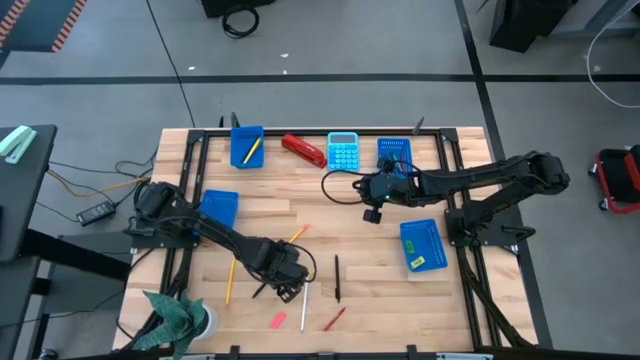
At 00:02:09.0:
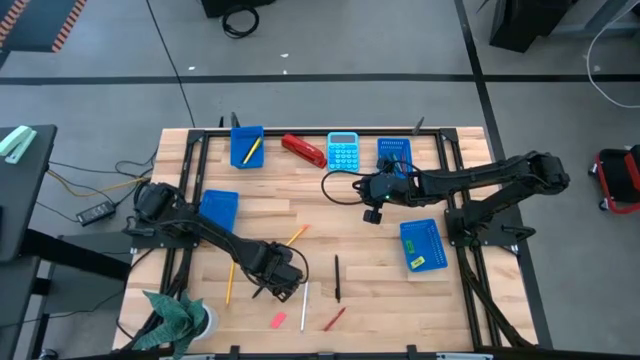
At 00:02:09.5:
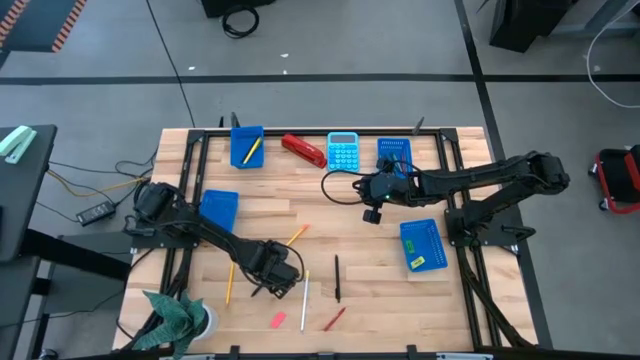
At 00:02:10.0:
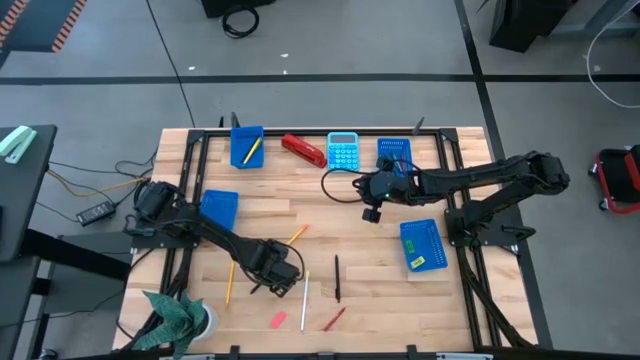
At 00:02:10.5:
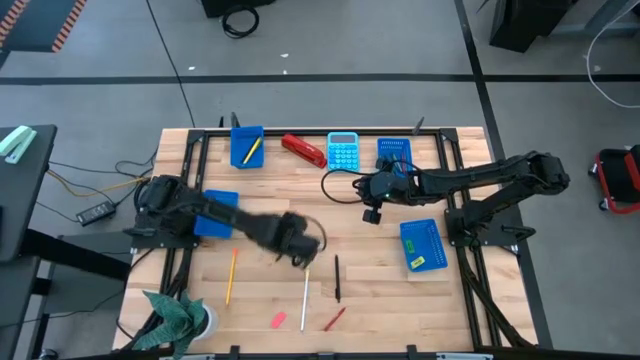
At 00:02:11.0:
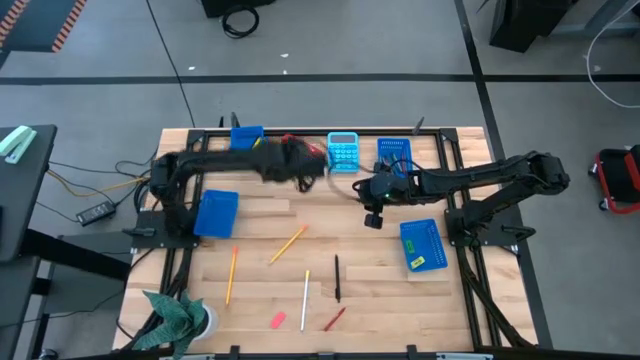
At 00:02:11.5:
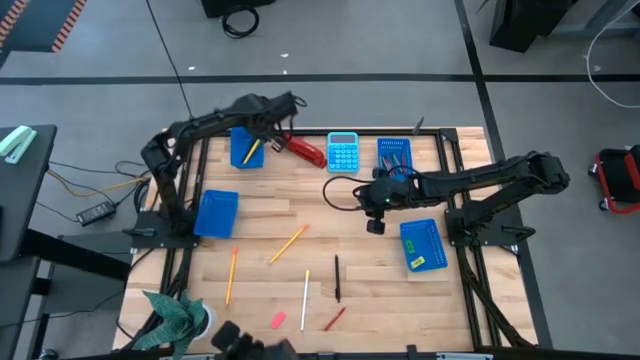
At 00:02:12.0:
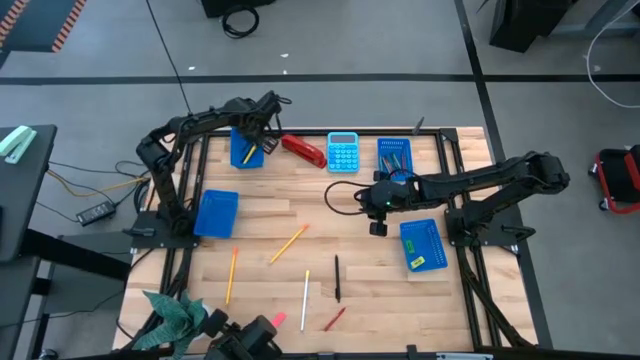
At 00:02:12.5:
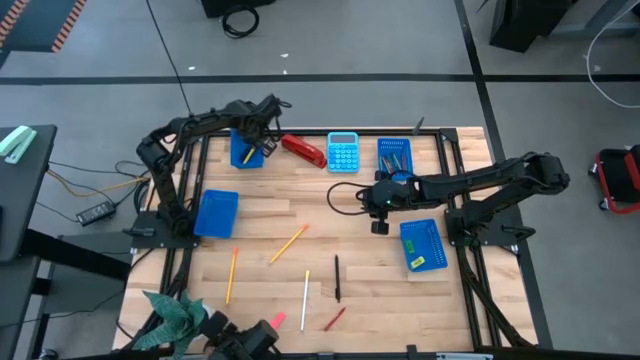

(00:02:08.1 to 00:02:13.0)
Task: Sort crayons/erasers/pens/pencils in bins
Put the left black pen into the top left bin

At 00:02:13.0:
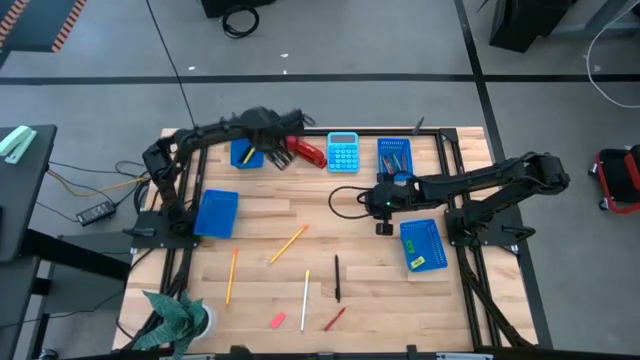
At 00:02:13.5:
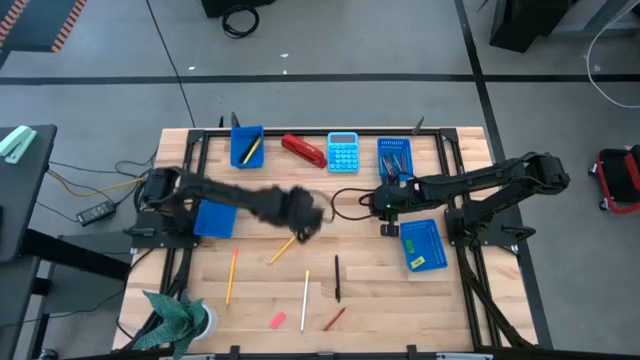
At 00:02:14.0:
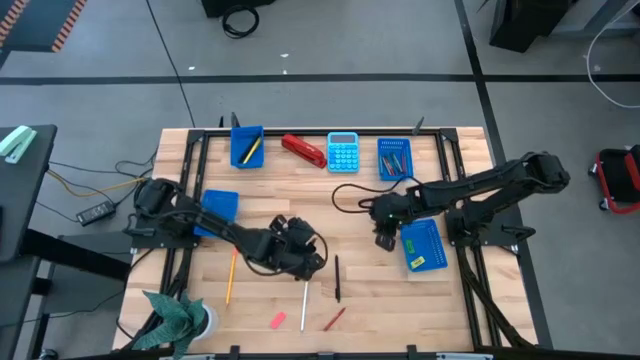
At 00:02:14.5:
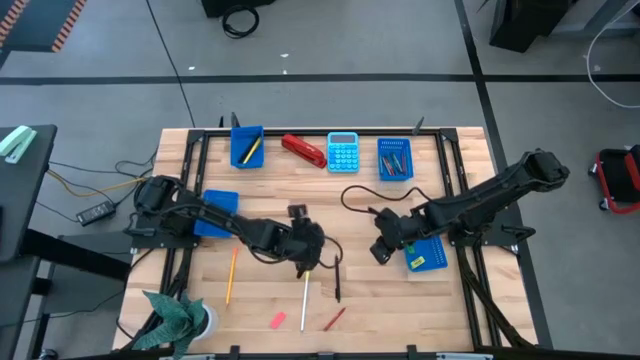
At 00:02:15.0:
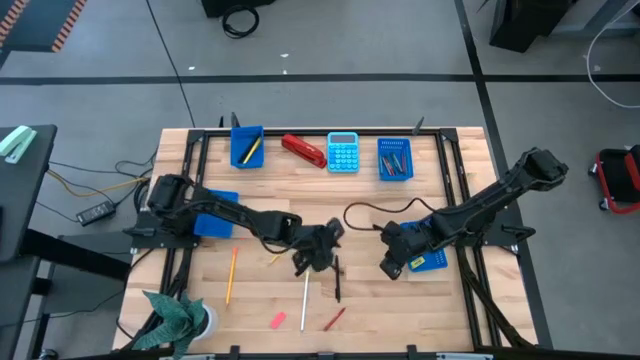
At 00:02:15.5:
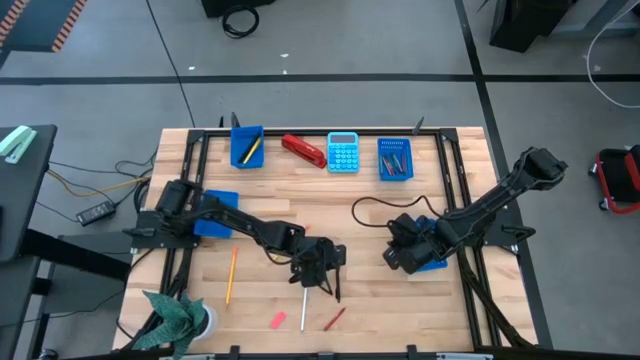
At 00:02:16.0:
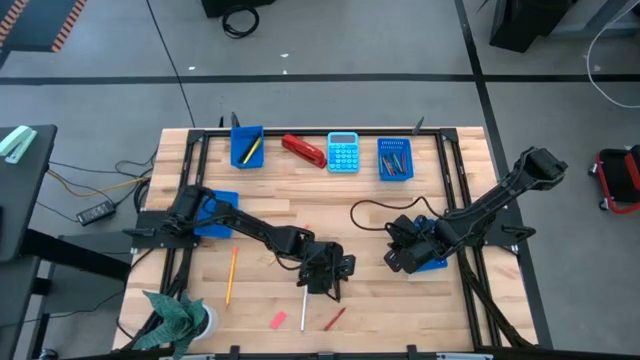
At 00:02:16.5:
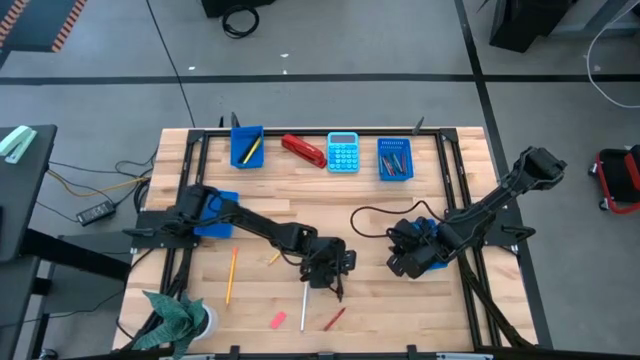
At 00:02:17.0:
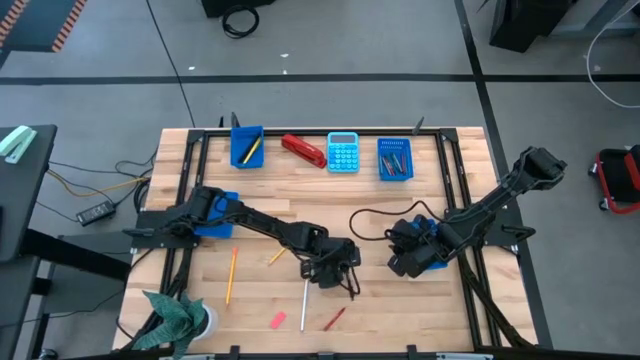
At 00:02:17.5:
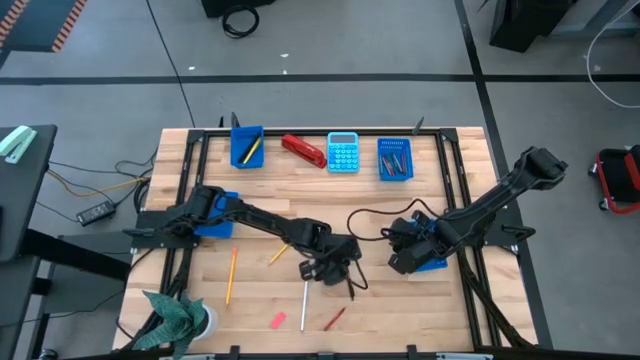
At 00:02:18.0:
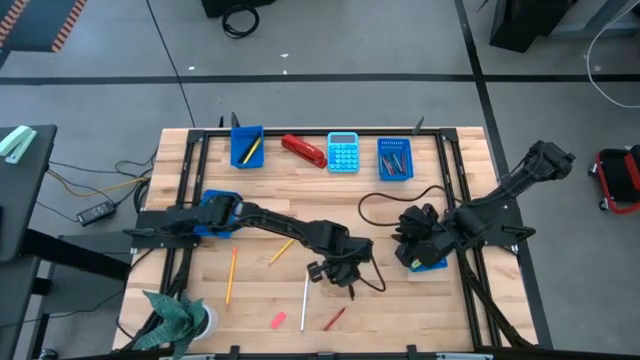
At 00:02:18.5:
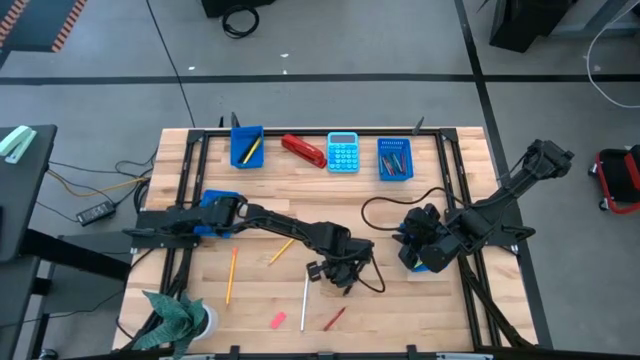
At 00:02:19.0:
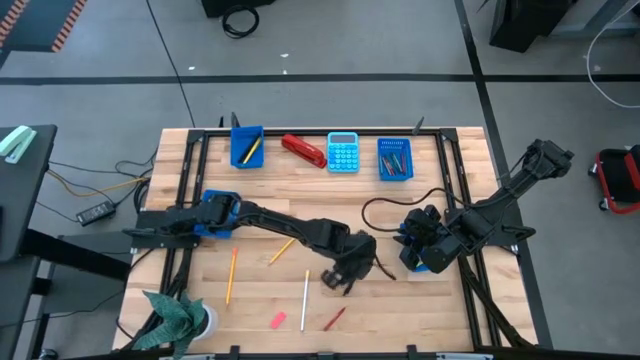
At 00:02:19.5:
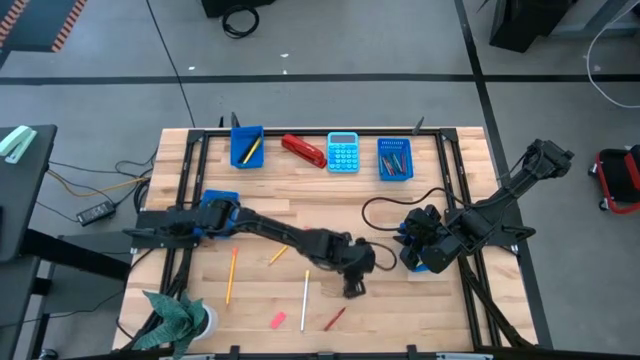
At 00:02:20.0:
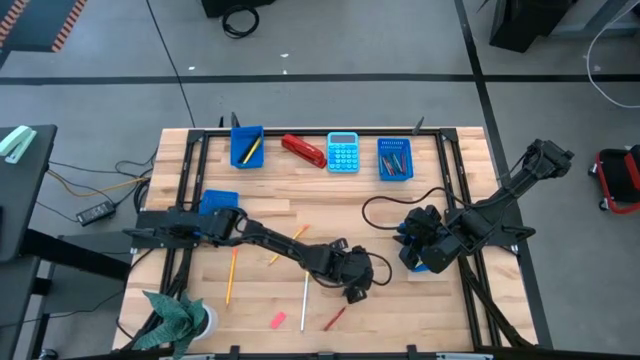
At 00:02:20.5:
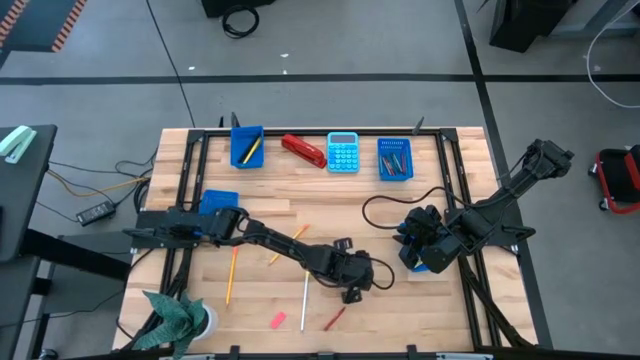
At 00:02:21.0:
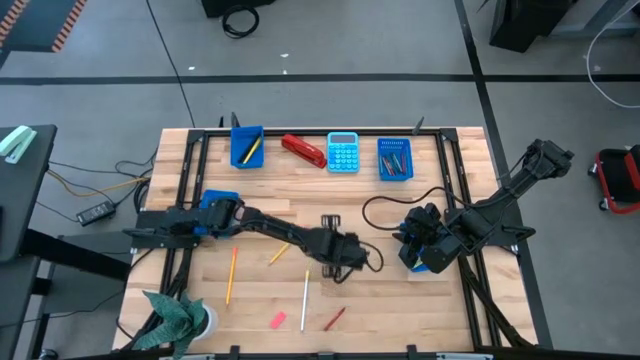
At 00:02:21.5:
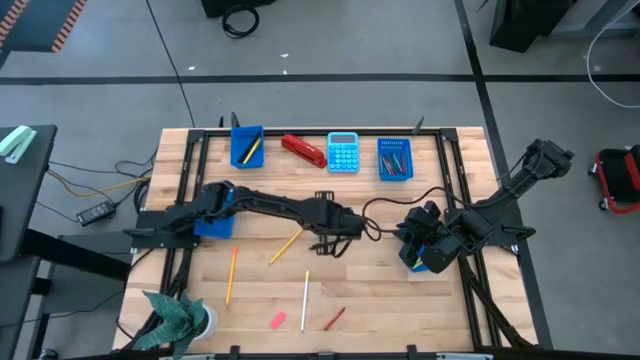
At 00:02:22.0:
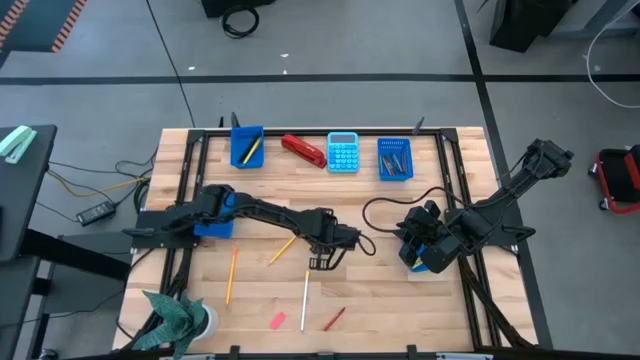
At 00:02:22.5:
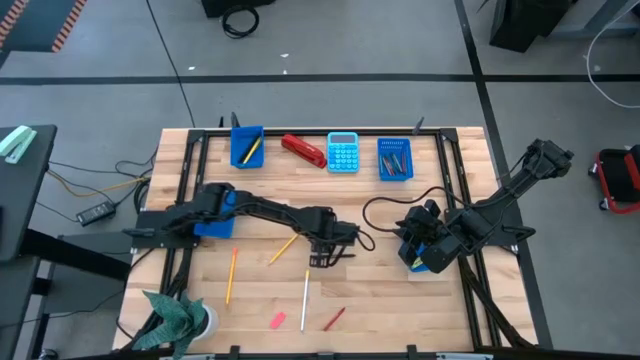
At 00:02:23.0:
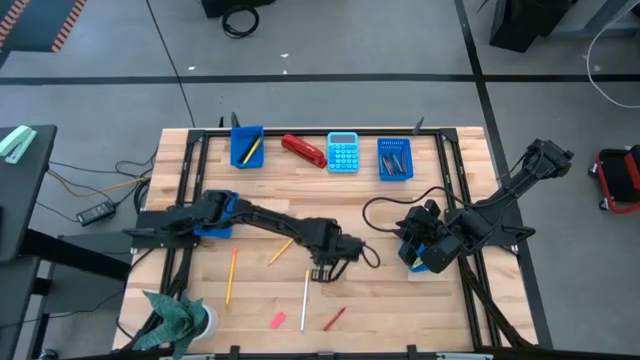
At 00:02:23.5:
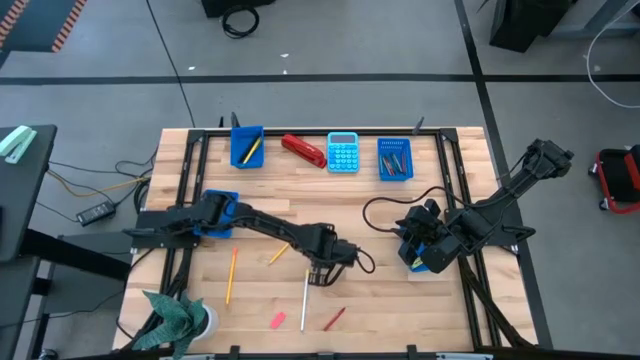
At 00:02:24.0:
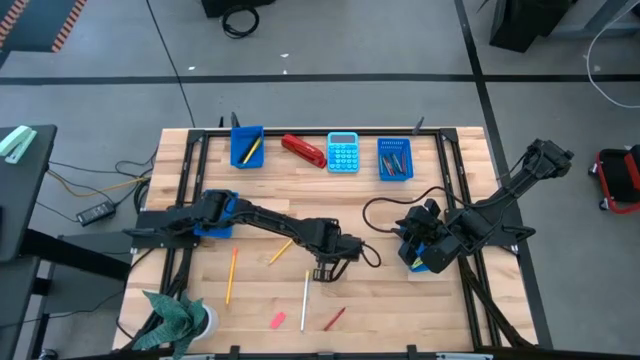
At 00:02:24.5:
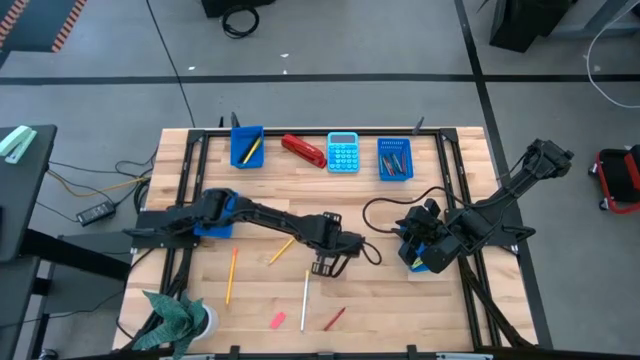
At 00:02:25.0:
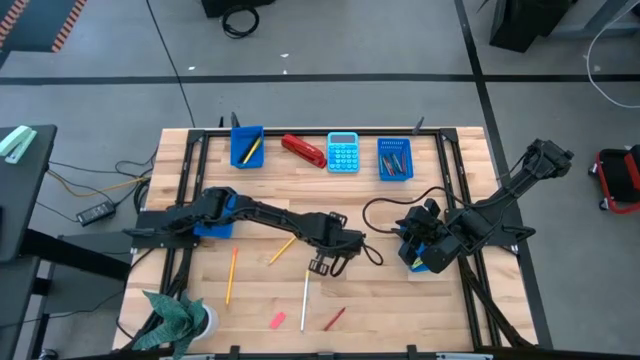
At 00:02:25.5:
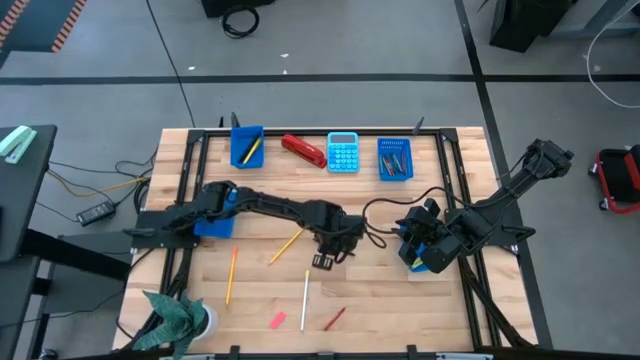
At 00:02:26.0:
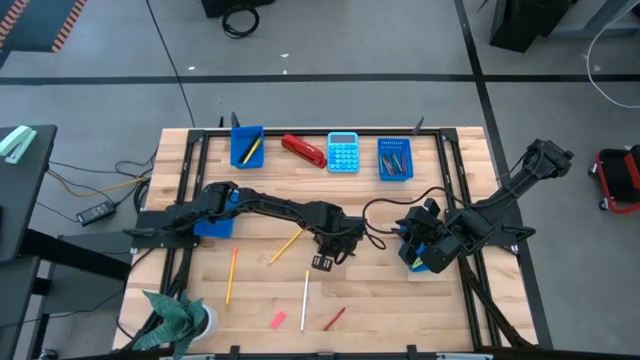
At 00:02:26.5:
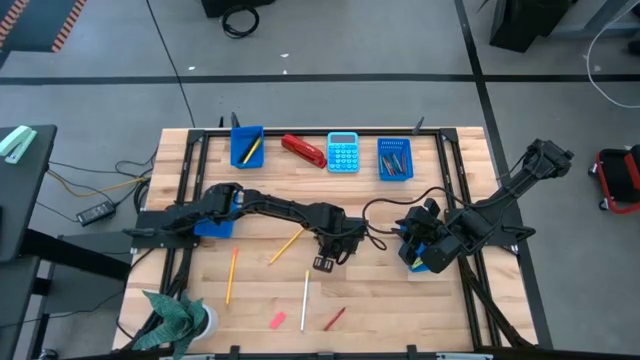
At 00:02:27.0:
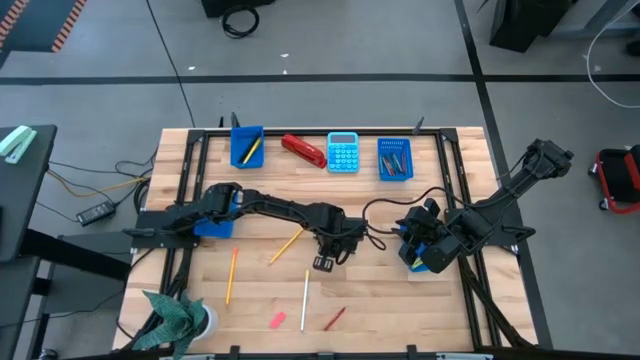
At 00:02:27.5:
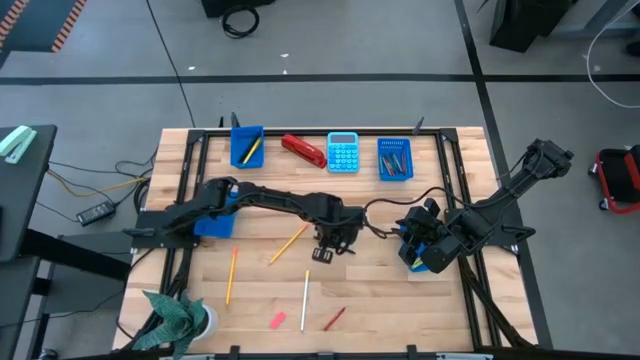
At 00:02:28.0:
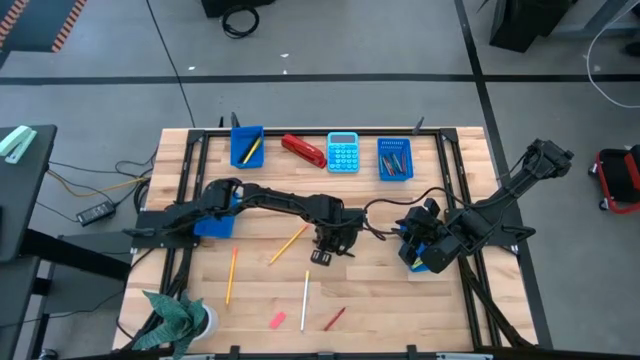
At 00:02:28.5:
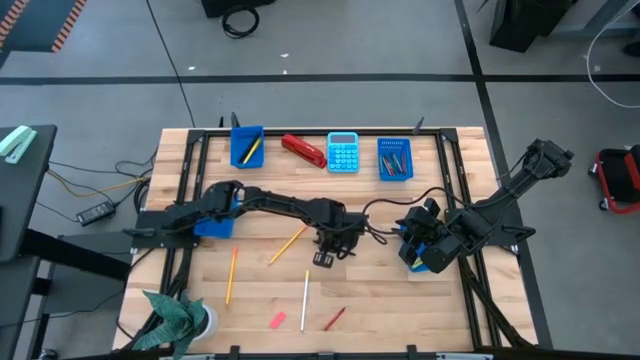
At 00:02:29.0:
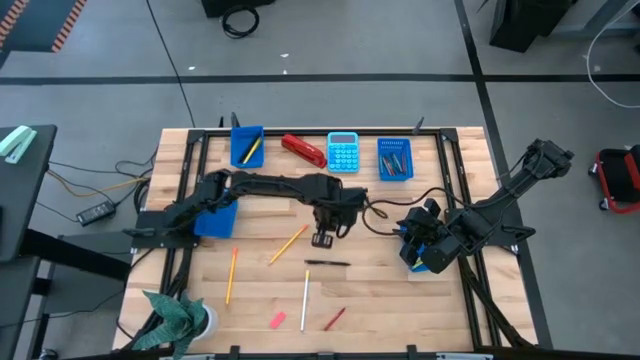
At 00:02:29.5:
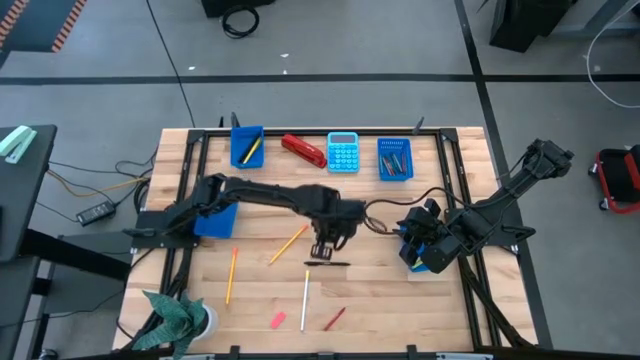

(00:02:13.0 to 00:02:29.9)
Put the black pen into the top left bin
